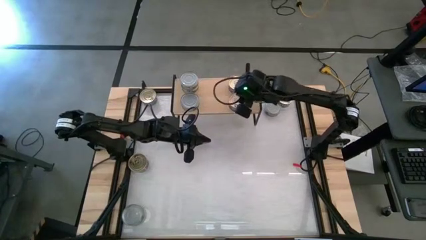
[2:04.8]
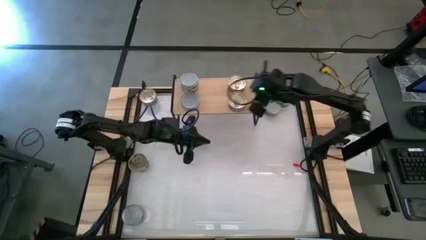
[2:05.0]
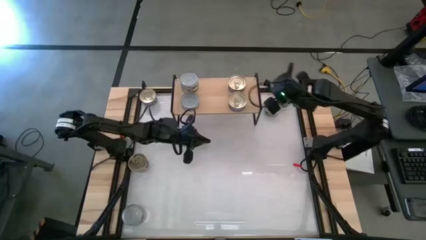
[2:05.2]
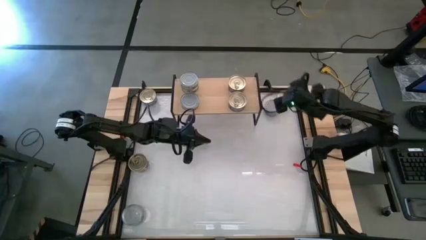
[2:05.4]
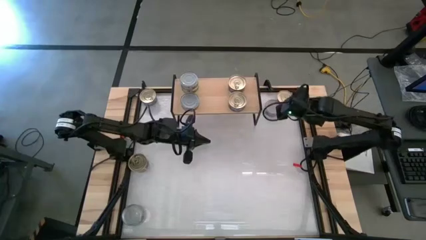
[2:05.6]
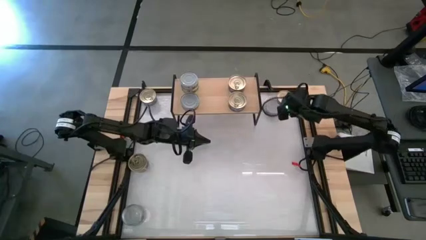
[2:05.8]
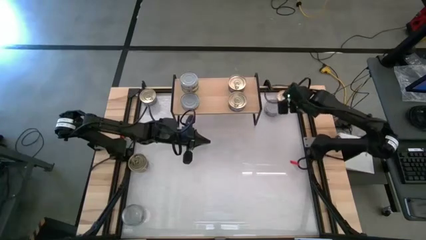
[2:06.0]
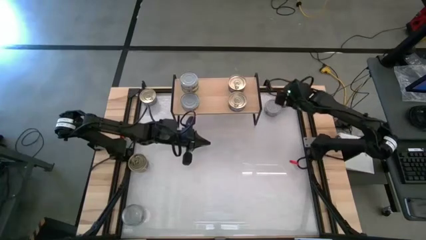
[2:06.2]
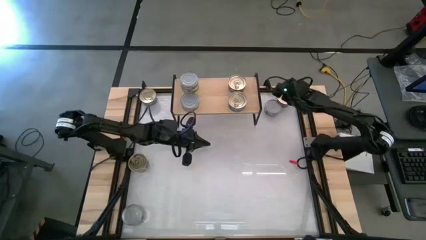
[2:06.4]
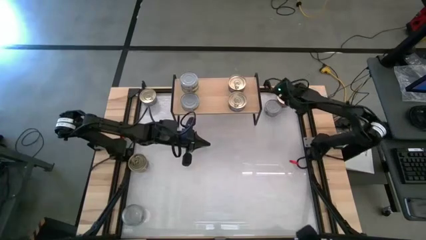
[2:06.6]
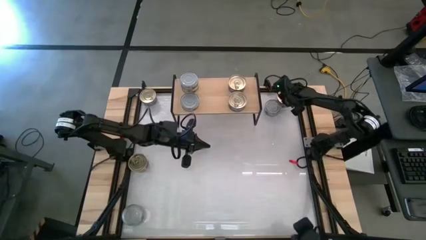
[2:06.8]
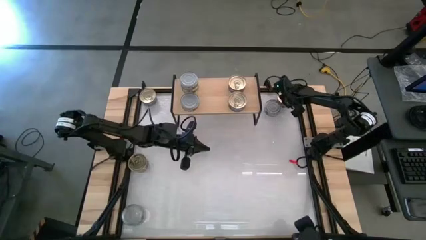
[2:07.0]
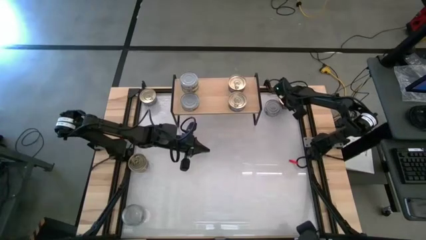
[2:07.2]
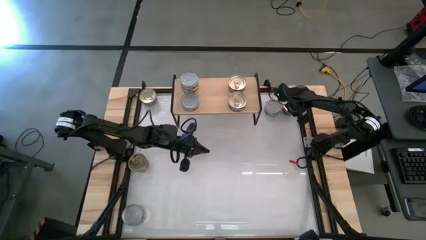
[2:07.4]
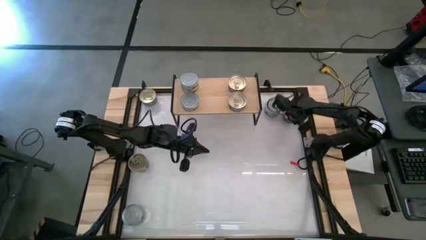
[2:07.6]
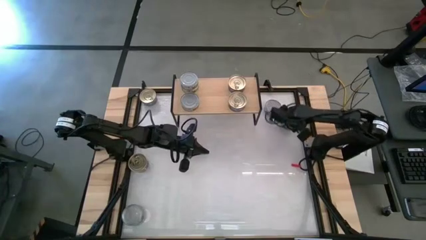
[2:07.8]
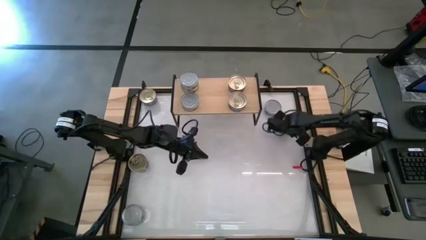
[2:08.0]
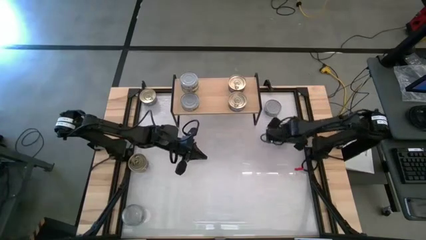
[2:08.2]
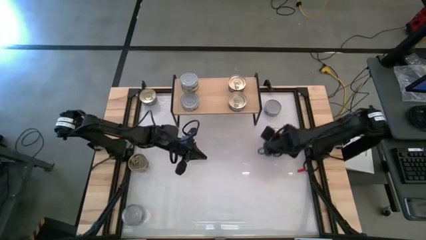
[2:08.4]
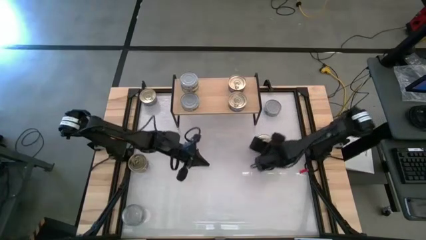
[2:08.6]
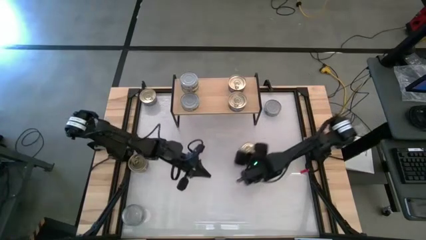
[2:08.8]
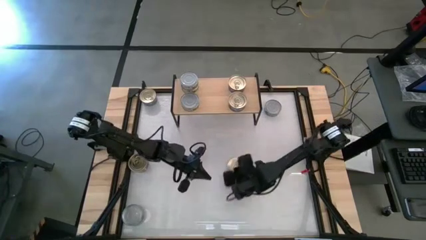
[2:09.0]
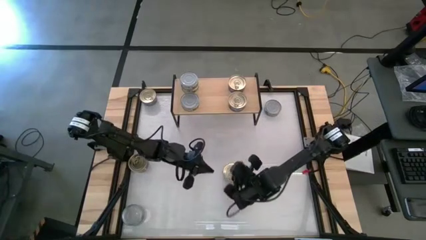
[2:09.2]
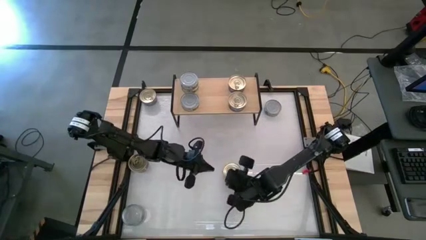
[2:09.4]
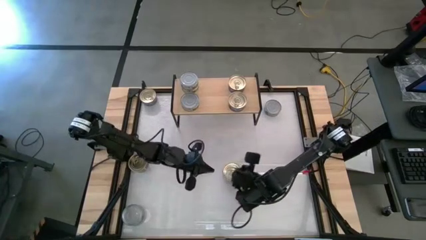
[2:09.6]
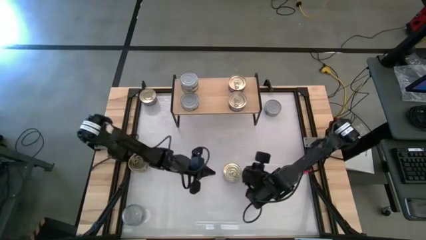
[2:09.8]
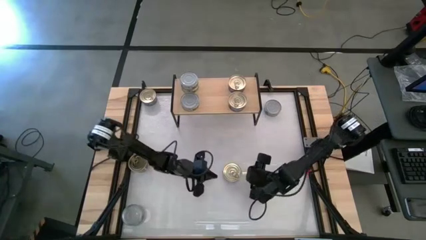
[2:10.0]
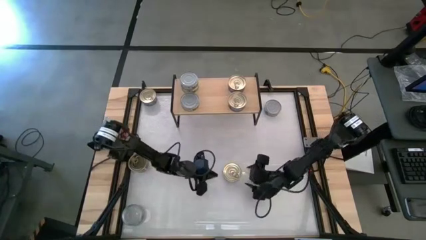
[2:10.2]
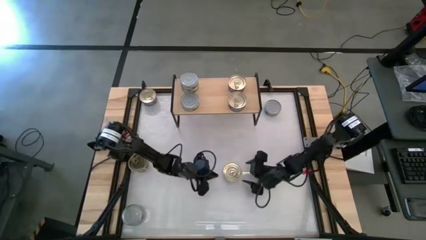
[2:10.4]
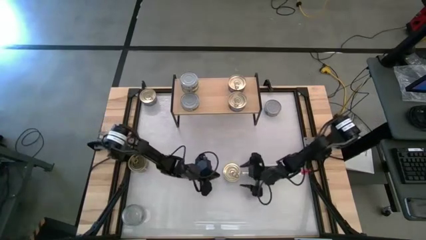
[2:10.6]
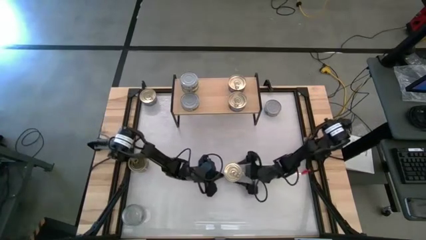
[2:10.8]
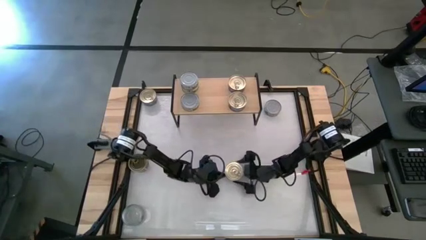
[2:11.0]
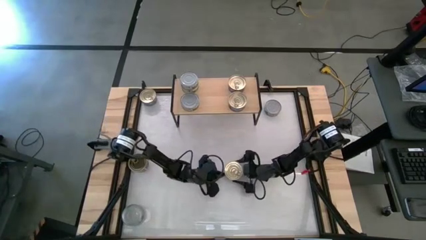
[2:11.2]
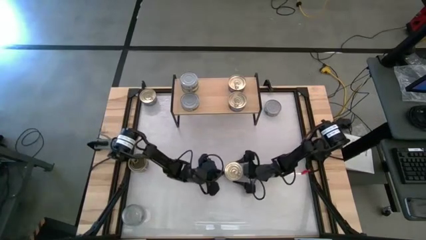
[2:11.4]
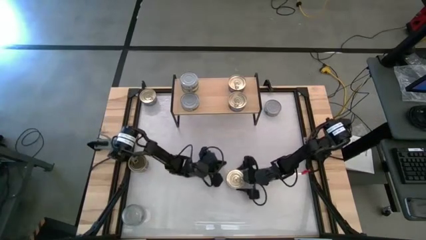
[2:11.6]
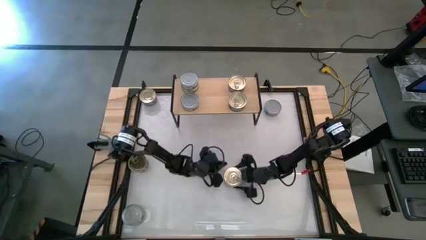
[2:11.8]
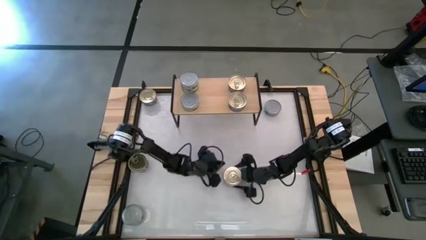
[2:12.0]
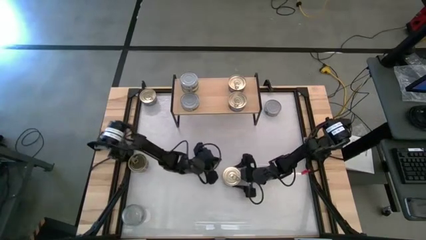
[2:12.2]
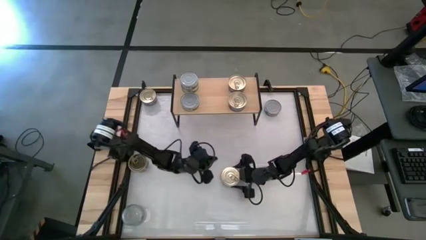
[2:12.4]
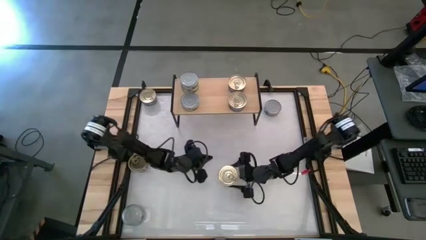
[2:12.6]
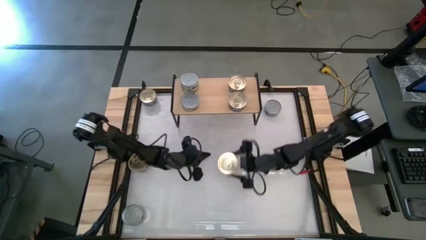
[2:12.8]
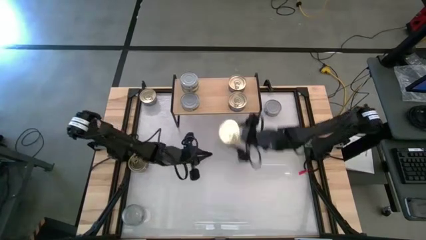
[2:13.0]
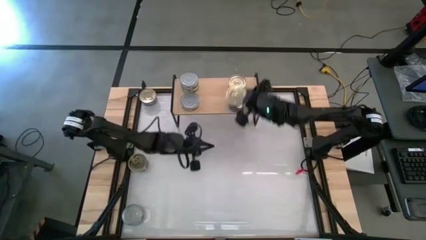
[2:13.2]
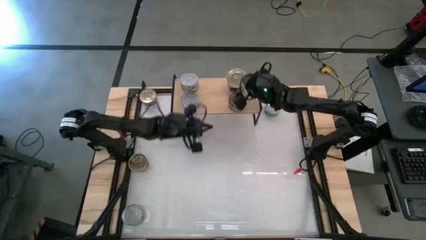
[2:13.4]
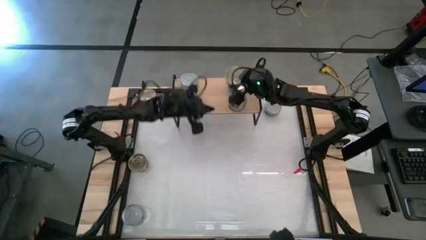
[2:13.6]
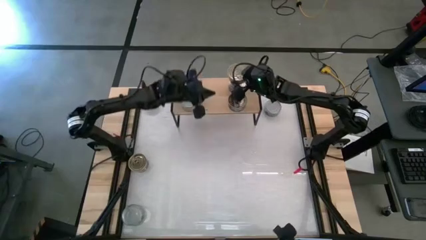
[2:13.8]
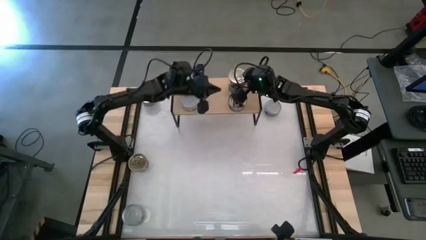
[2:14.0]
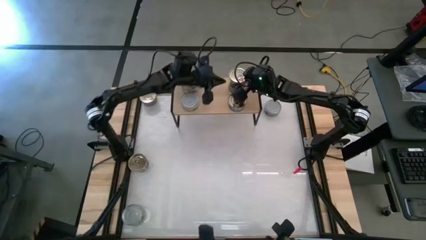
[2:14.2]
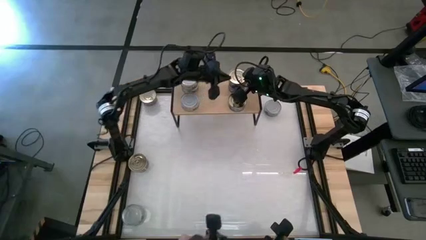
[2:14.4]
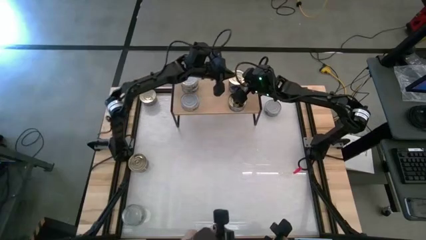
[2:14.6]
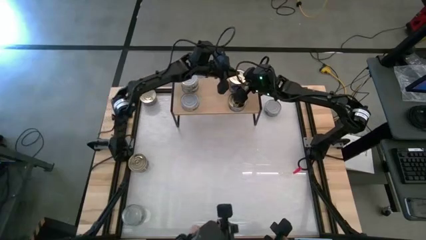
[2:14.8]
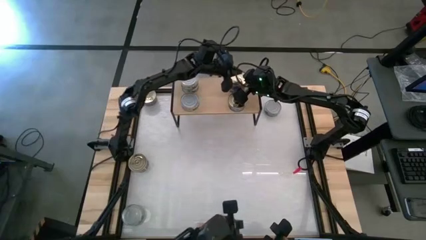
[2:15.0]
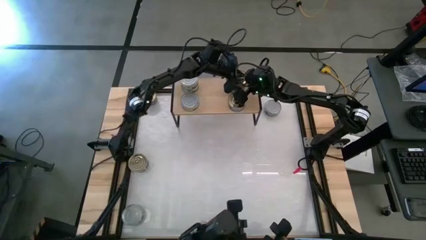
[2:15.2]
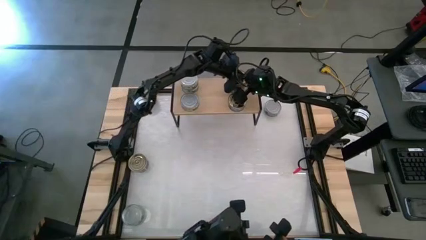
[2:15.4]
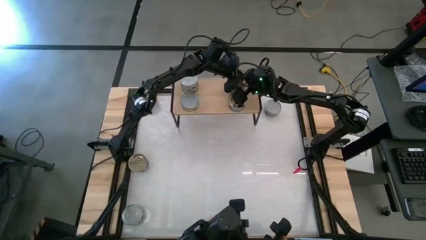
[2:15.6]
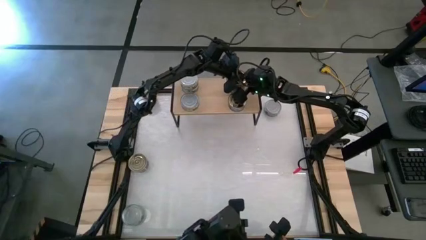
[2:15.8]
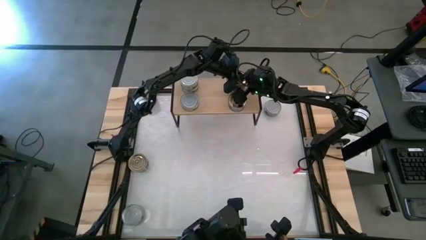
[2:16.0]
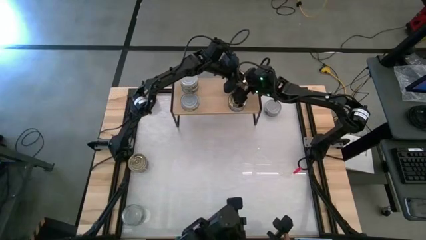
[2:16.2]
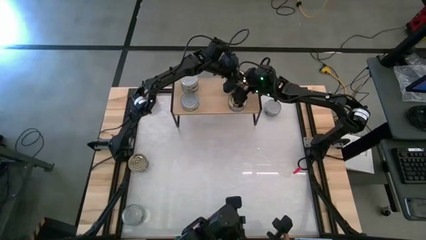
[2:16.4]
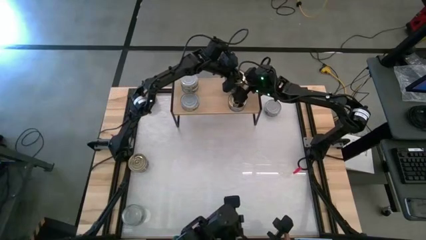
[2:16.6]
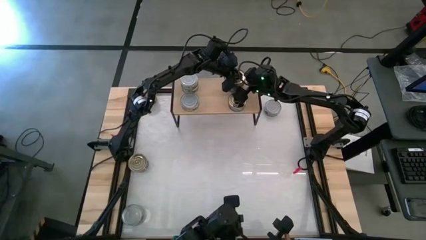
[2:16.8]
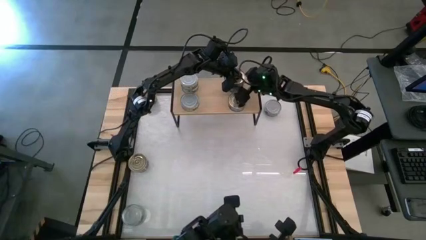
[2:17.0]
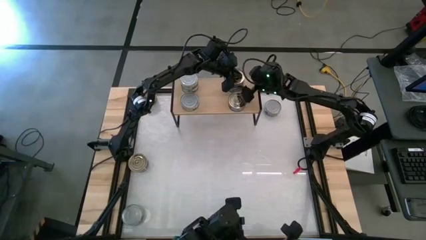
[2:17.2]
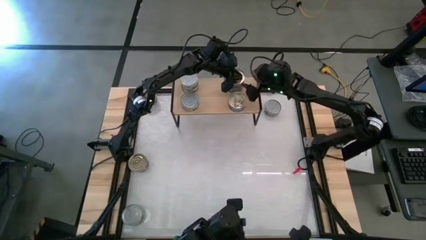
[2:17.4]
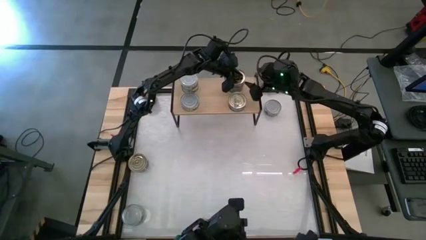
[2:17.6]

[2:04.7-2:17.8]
Task: Stack canned seafood by type on shelf
Stack the blue tuna can on top of the blue tuna can on the shelf
